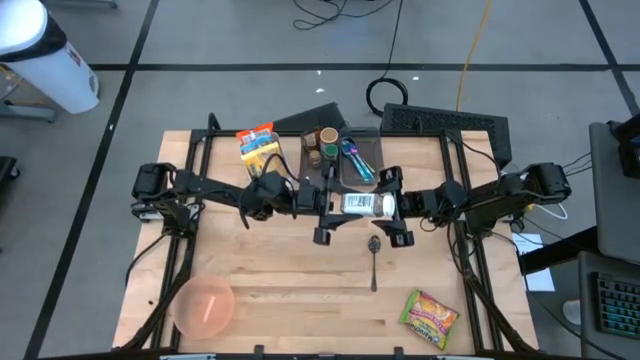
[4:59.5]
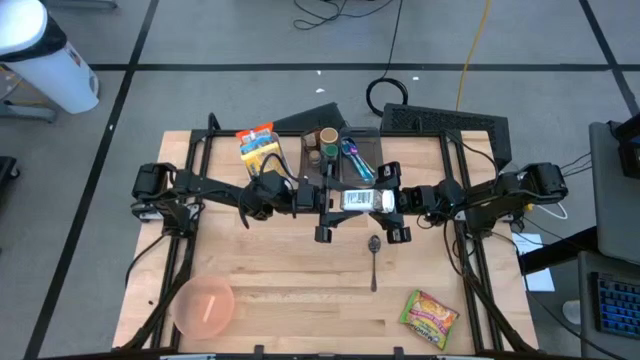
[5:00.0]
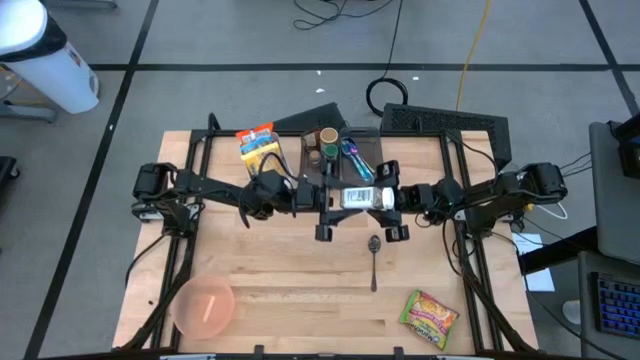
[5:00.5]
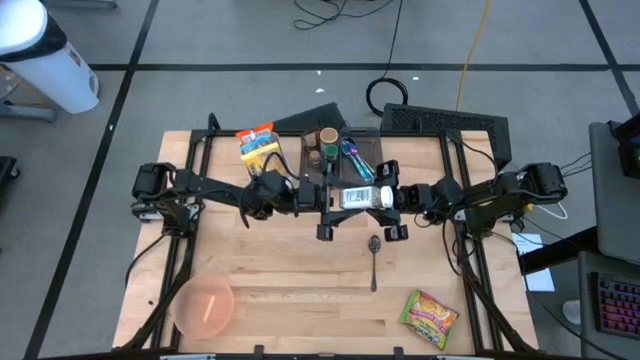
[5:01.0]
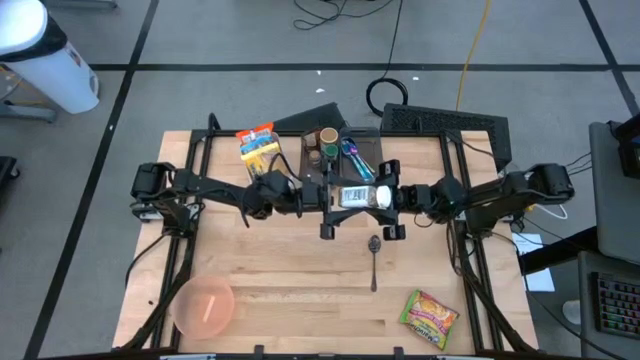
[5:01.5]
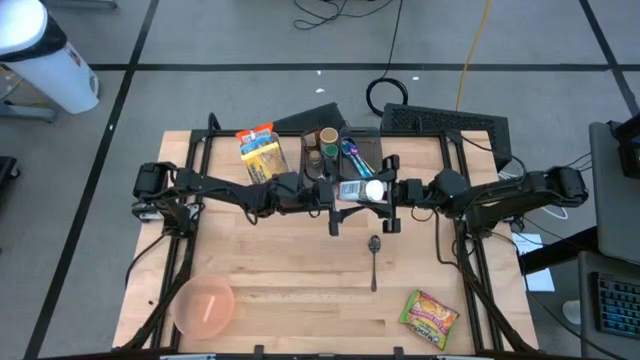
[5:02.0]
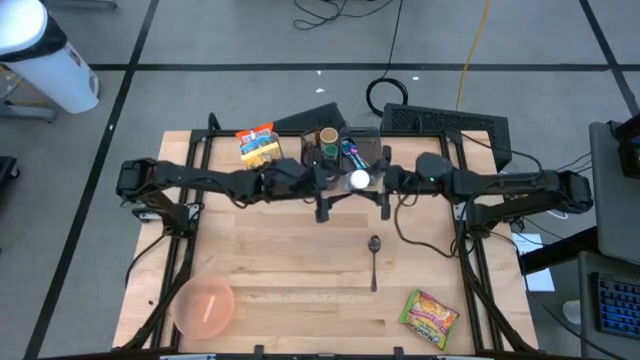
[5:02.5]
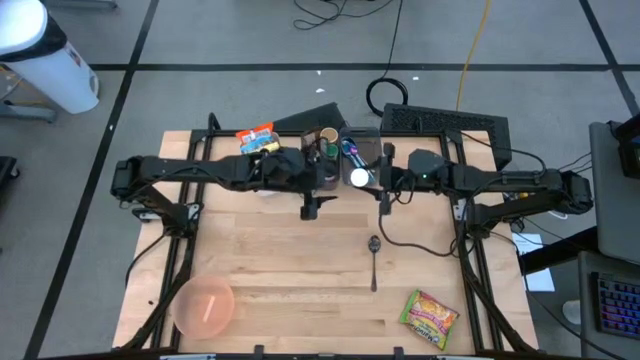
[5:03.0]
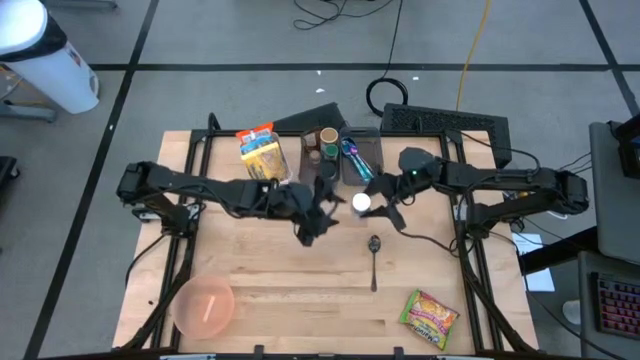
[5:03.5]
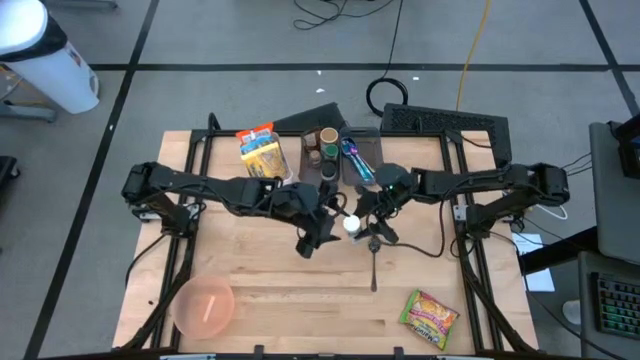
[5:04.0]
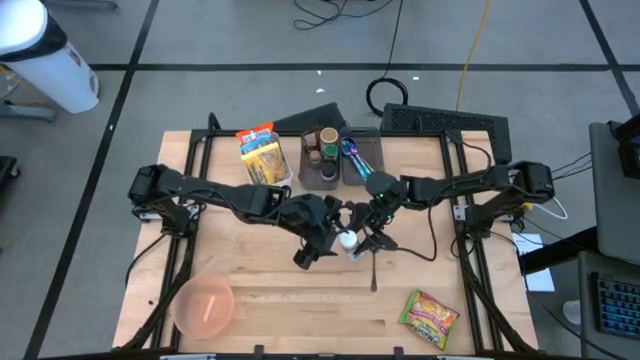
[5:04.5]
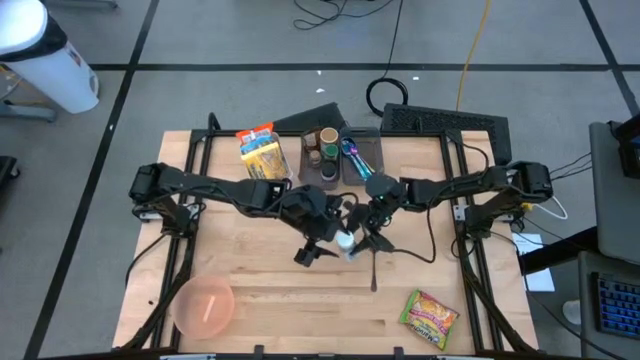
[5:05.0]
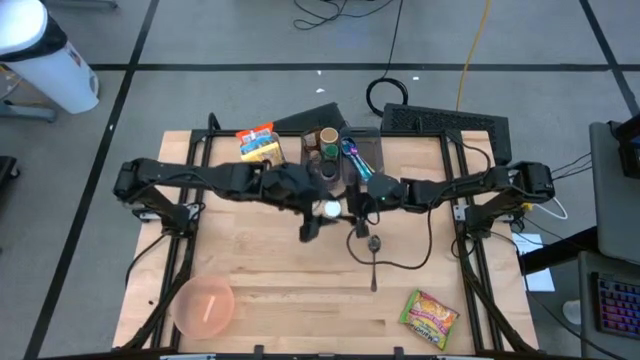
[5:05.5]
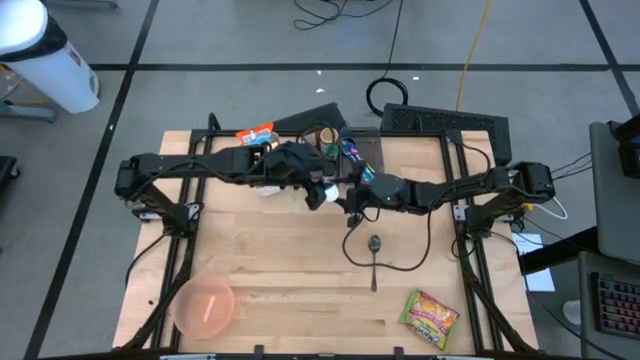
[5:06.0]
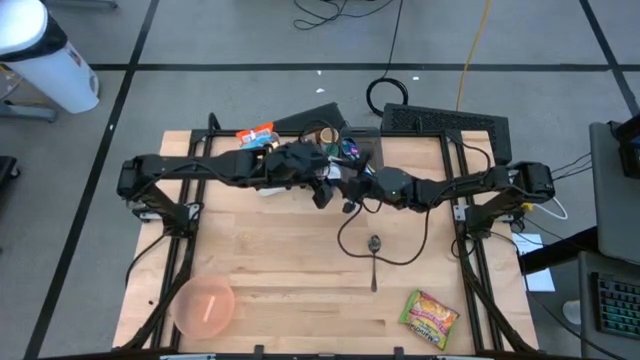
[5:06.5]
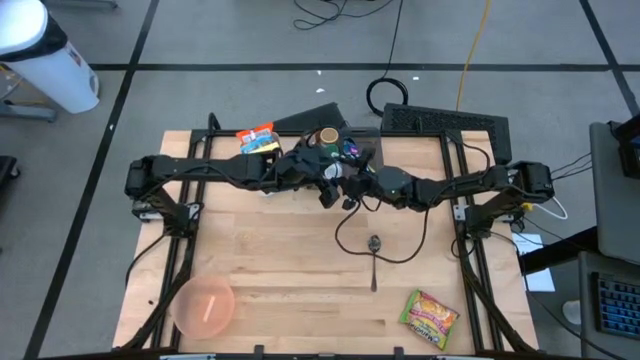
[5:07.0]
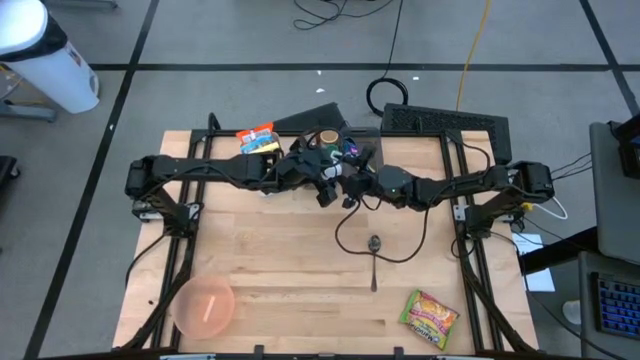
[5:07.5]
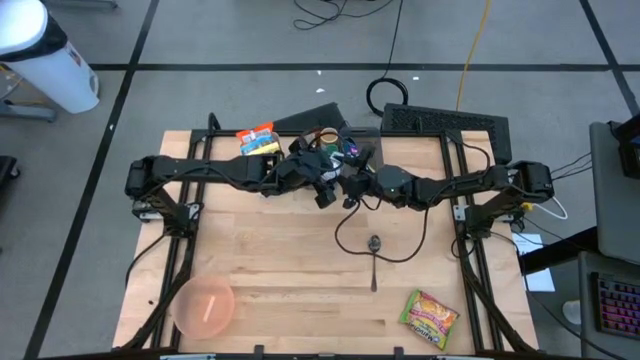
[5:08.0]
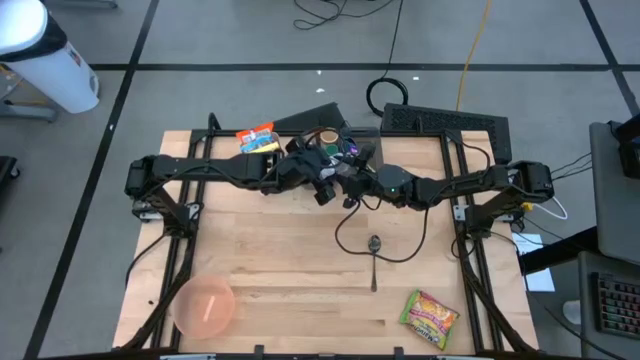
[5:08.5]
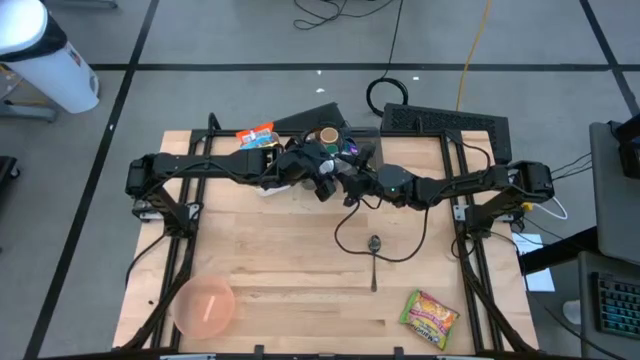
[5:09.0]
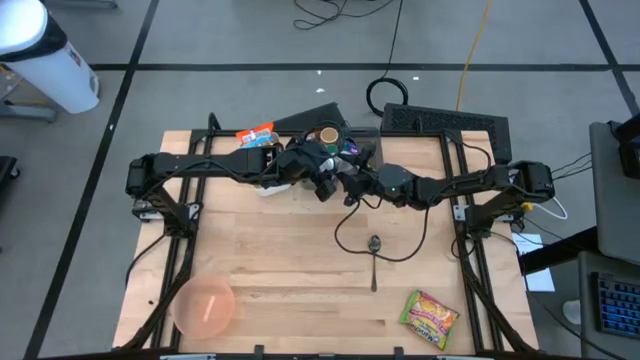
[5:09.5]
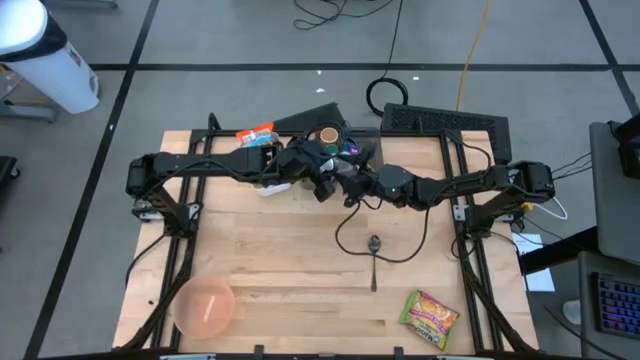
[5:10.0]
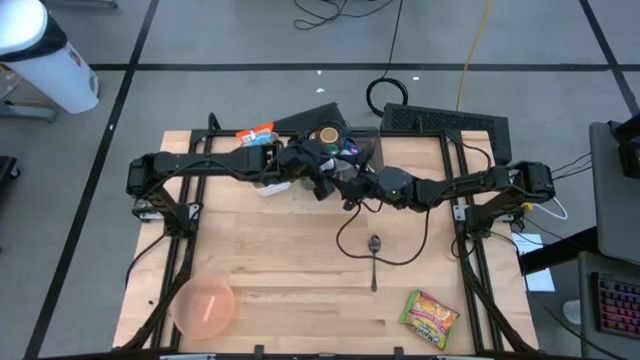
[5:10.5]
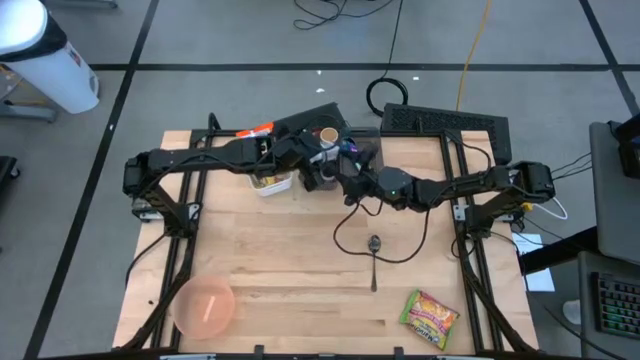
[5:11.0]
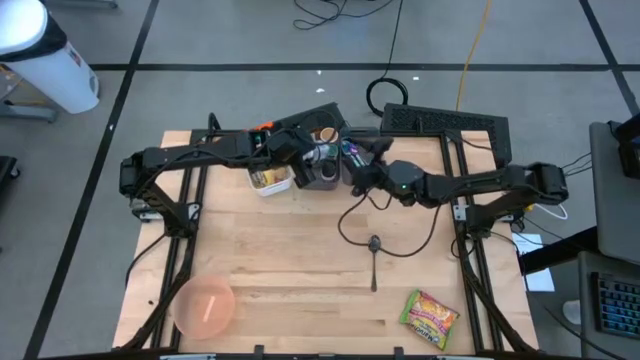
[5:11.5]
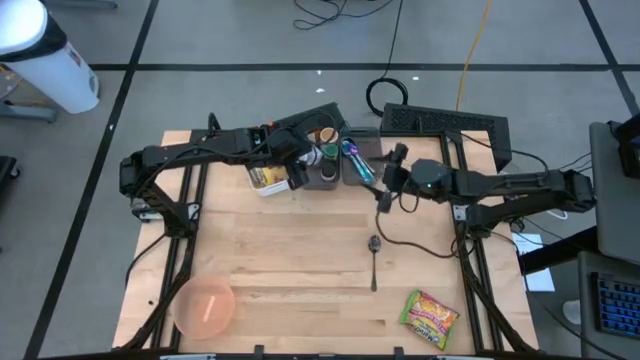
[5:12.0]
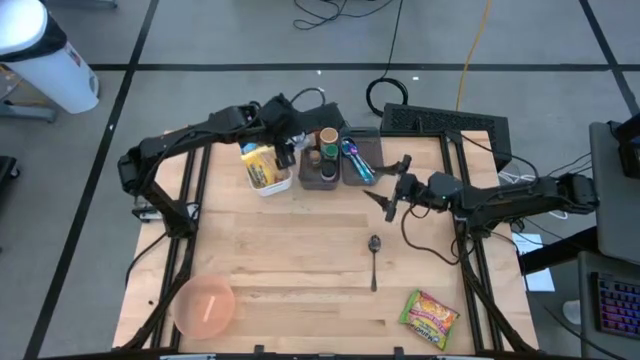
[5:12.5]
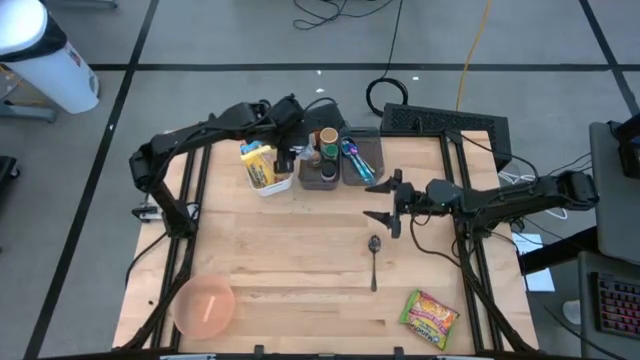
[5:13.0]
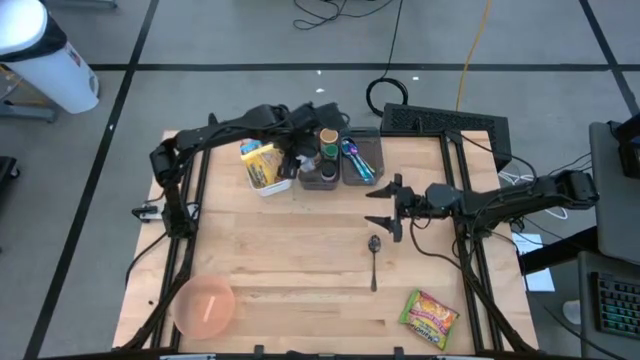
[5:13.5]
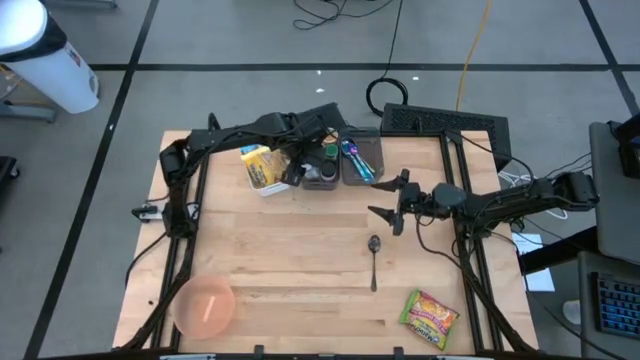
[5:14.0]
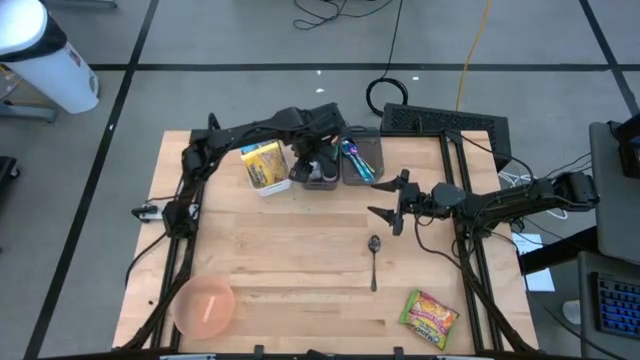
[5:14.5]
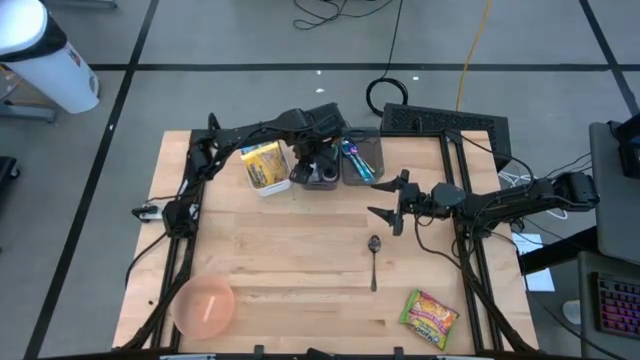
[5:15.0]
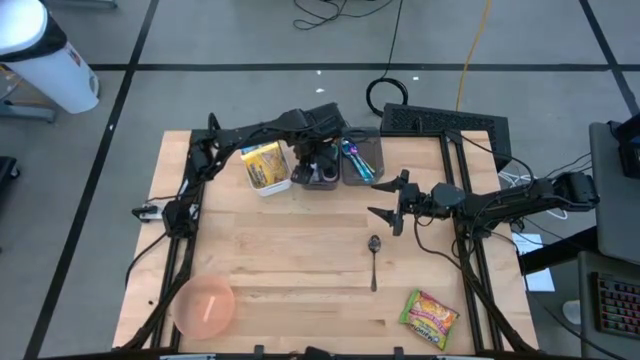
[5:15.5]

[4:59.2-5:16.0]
Task: Pick & Place Food Item
Put the white seasoning bottle into the left black bin

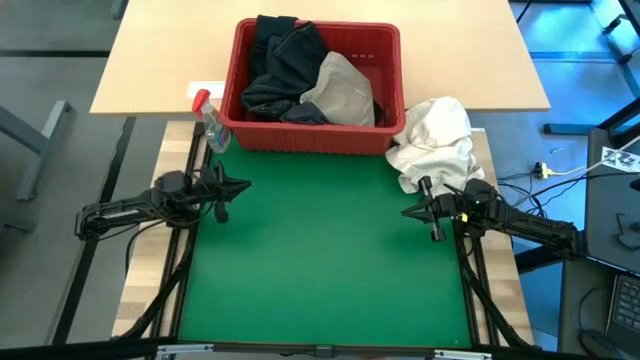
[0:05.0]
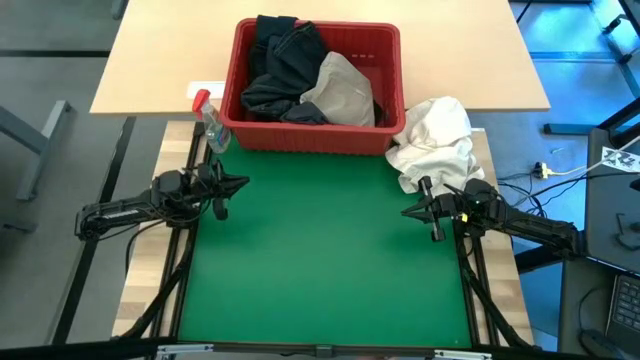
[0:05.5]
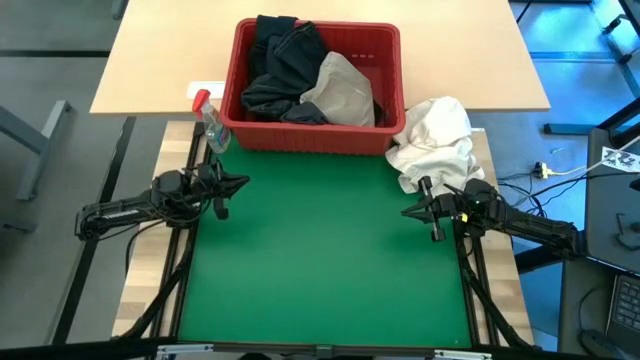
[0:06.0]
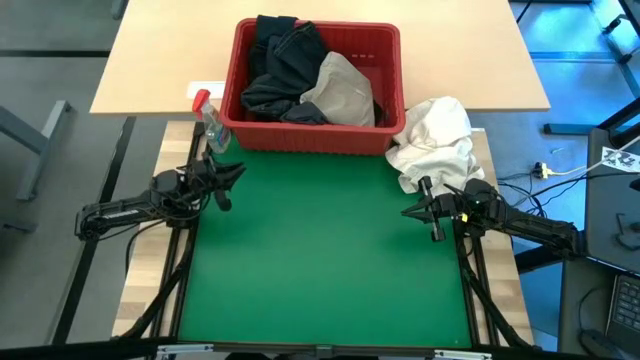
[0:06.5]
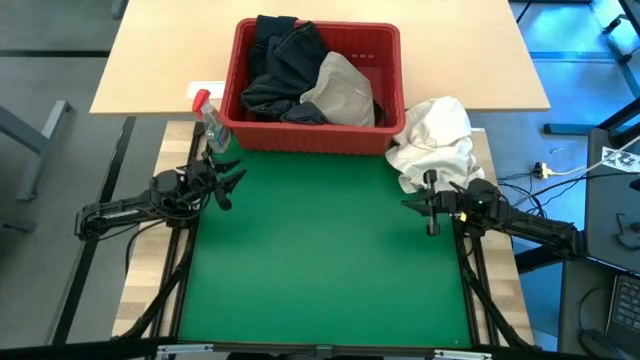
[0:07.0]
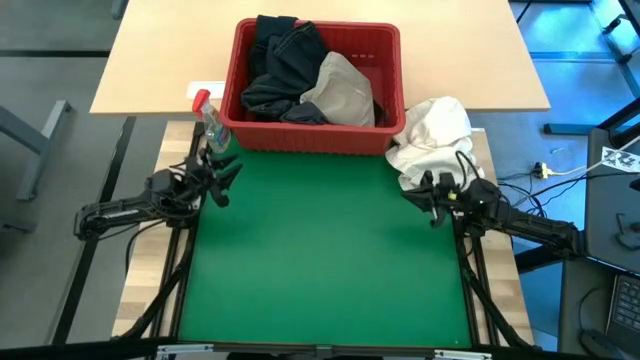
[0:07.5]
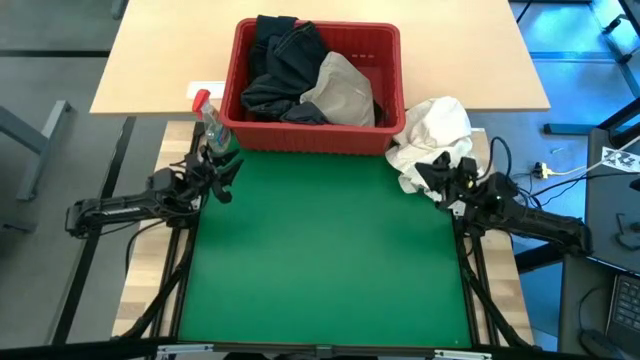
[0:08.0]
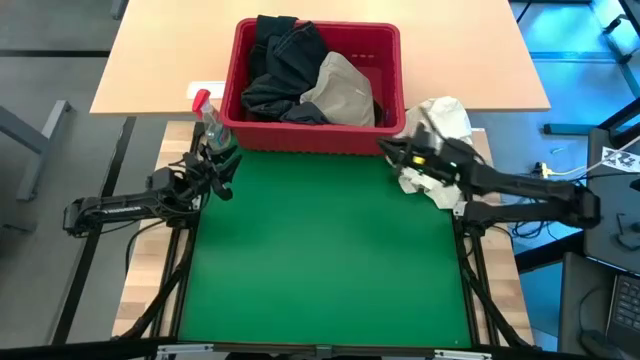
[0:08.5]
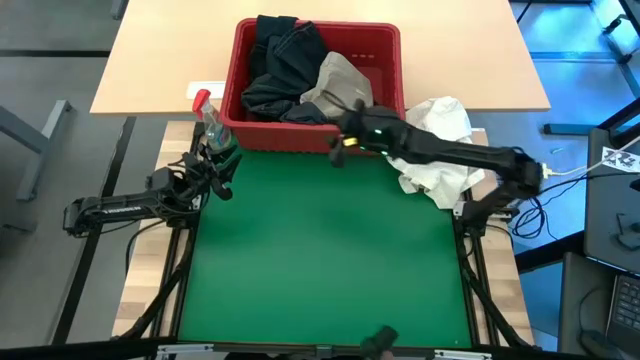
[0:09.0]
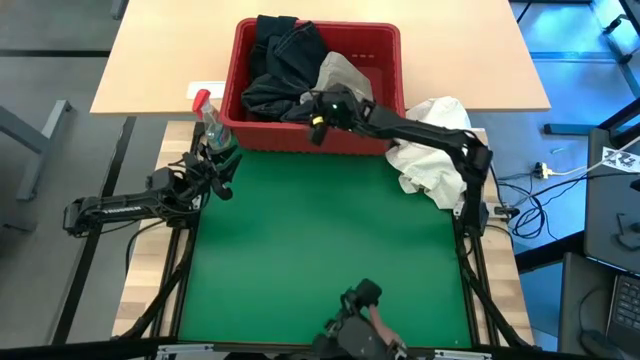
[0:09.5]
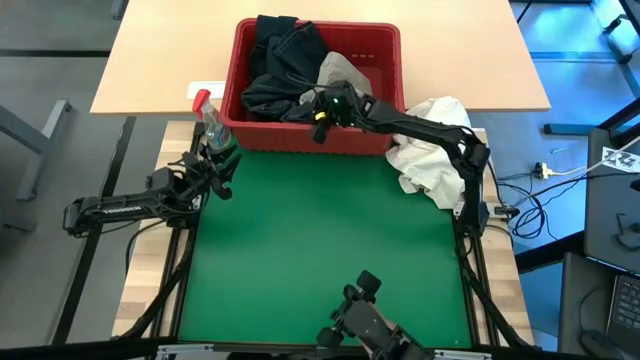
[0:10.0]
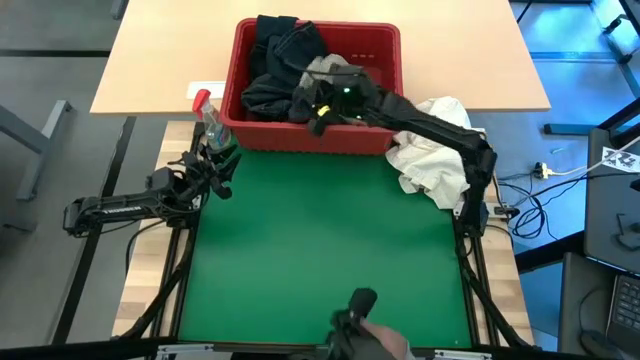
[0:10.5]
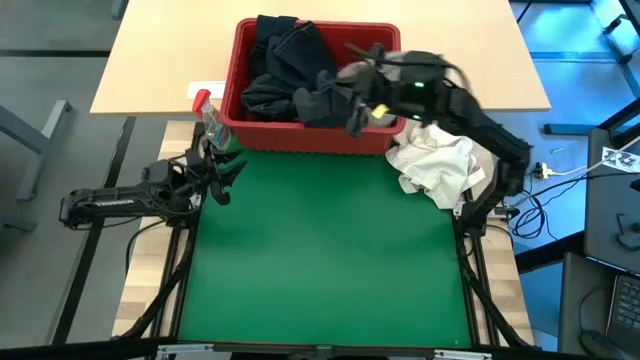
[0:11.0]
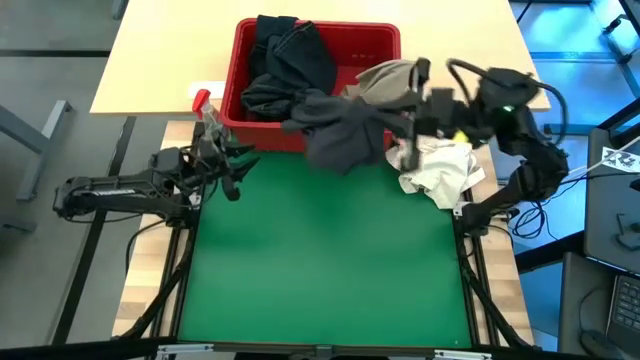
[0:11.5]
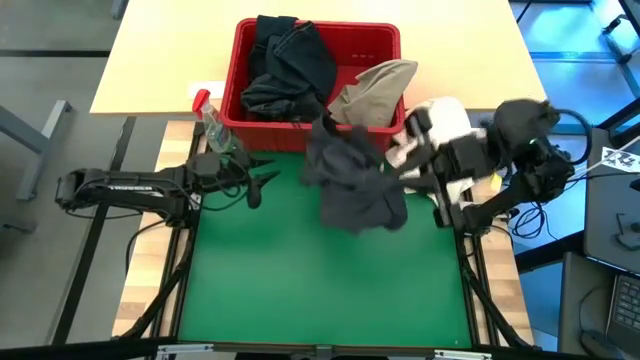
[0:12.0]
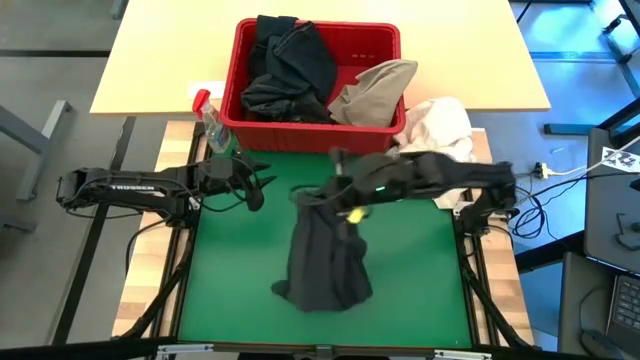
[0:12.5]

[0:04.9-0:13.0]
Task: Fold Laundry from Bin
Remove the black shorts from the red laundry bin
